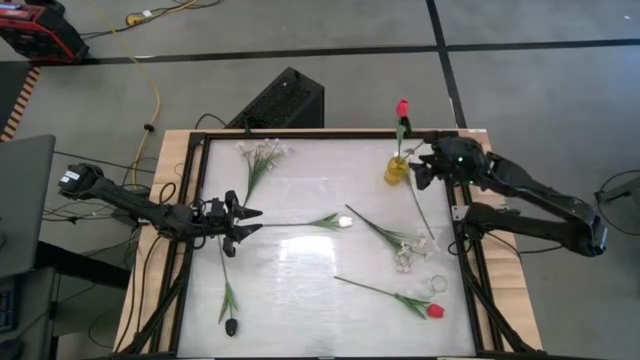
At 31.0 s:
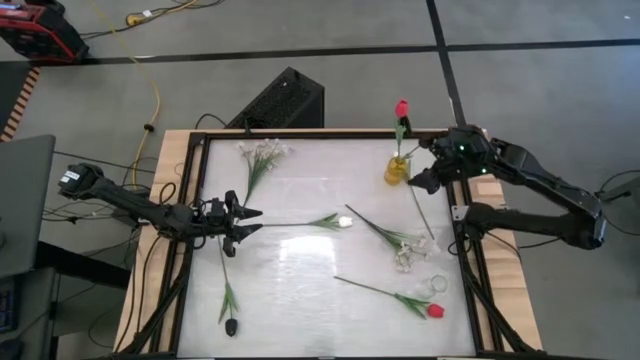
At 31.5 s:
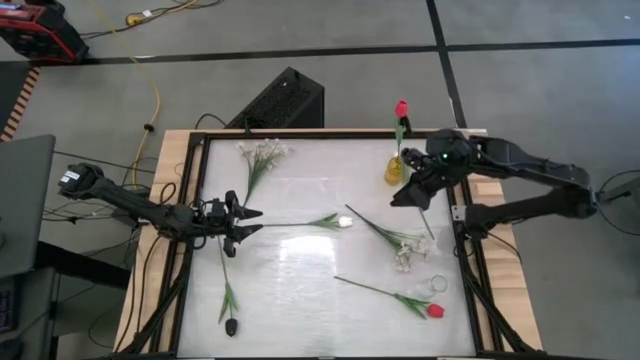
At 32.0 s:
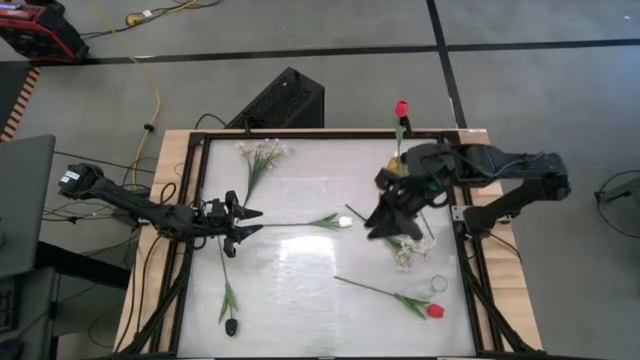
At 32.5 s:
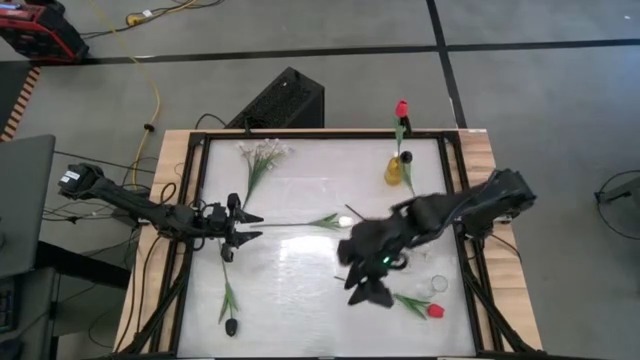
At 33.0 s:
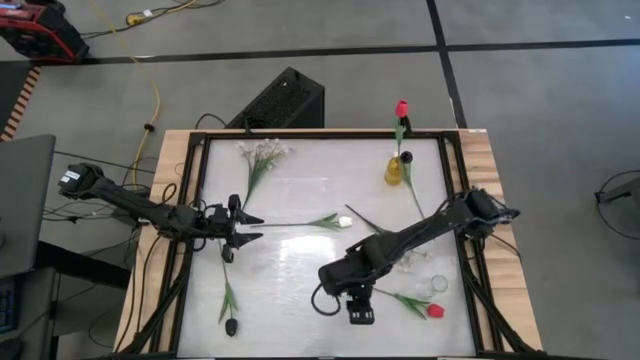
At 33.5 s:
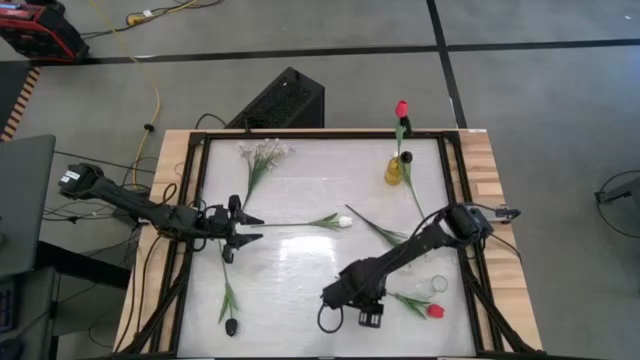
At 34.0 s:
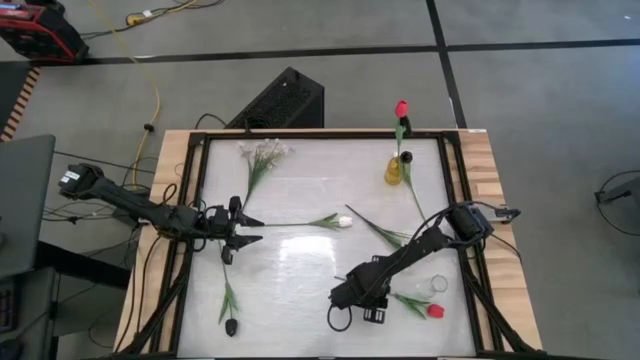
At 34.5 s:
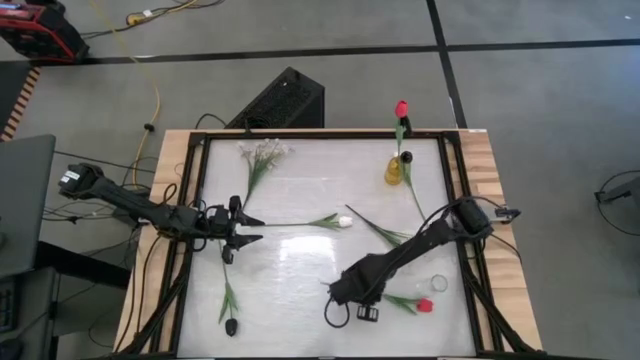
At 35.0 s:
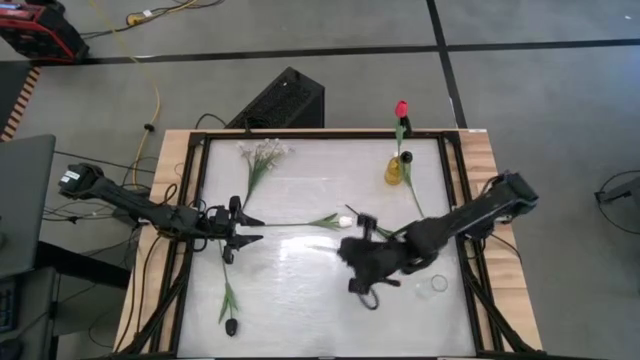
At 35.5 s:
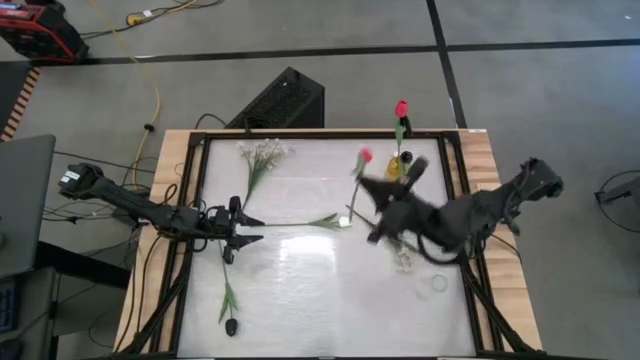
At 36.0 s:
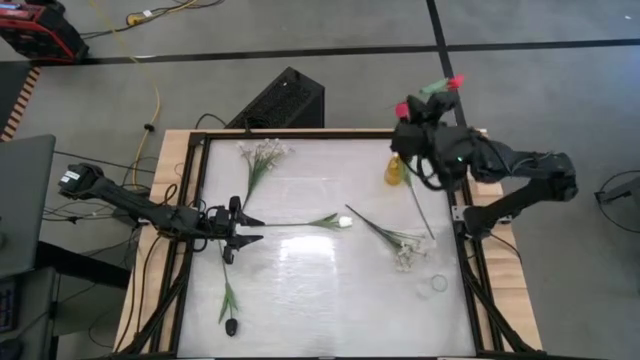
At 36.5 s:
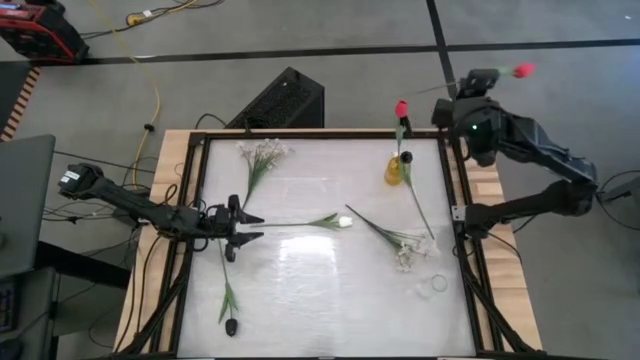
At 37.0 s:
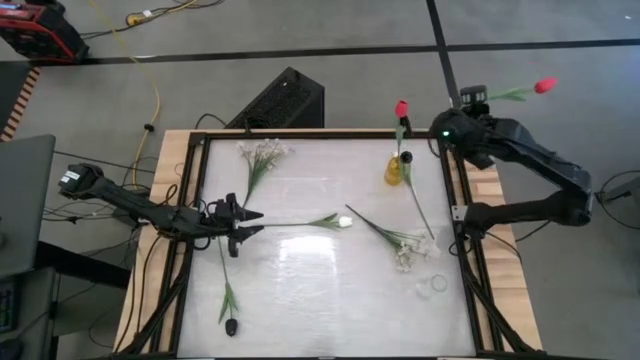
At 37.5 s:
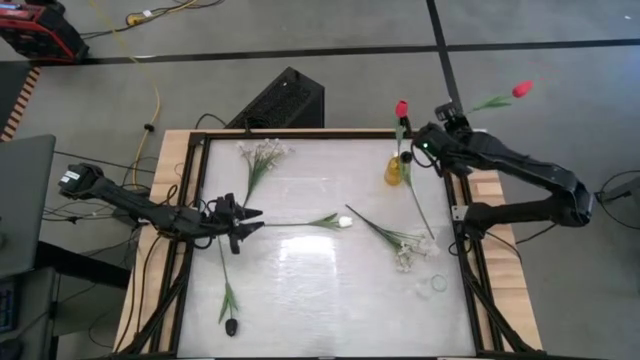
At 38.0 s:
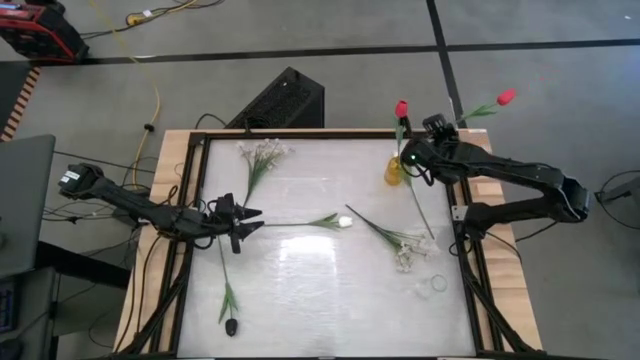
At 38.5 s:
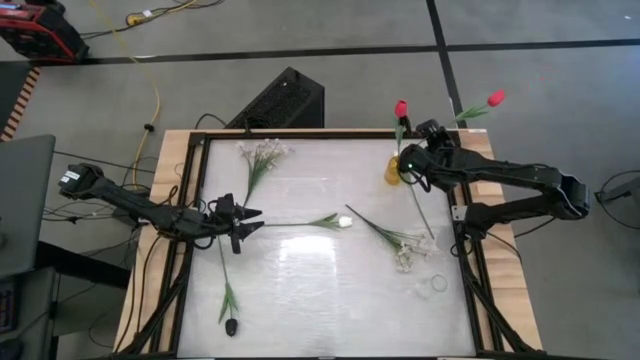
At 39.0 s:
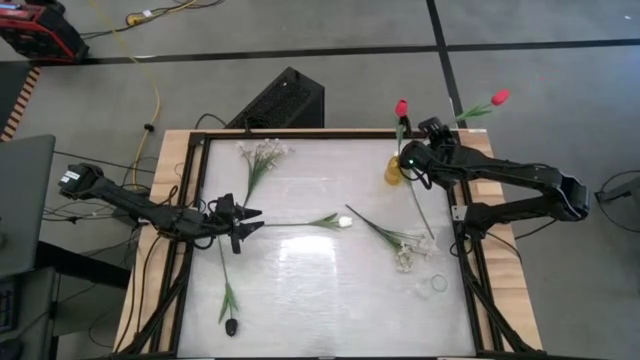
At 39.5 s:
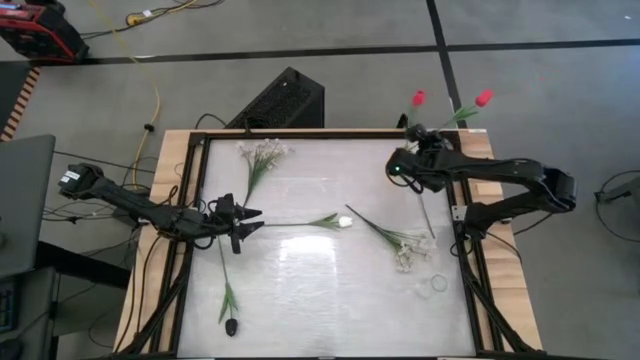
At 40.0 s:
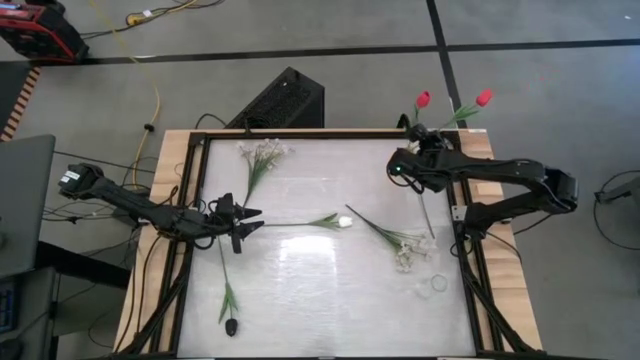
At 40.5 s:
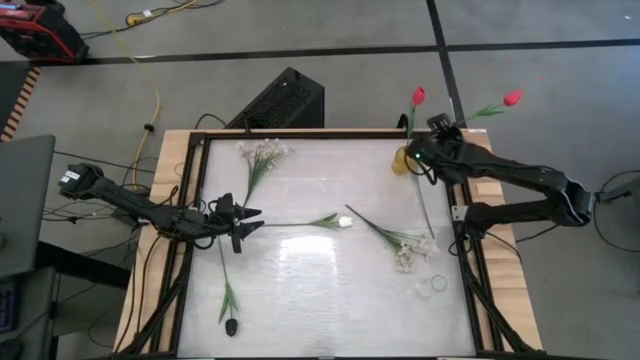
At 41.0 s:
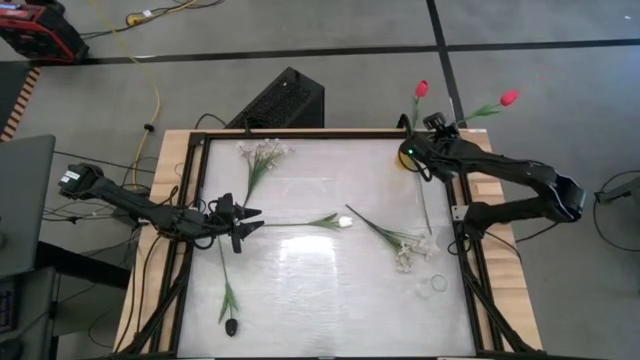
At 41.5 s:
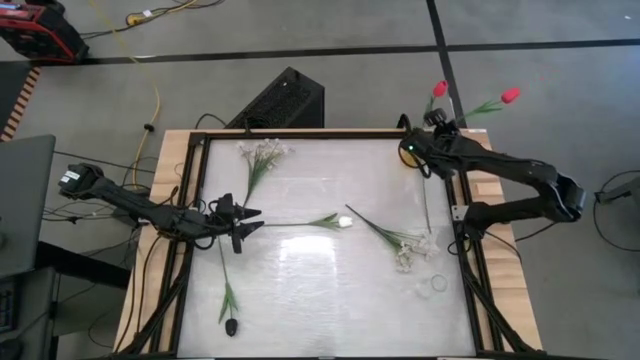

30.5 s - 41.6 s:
Task: Sort flowers into vase by color
Put the red flower into the yellow flower vase

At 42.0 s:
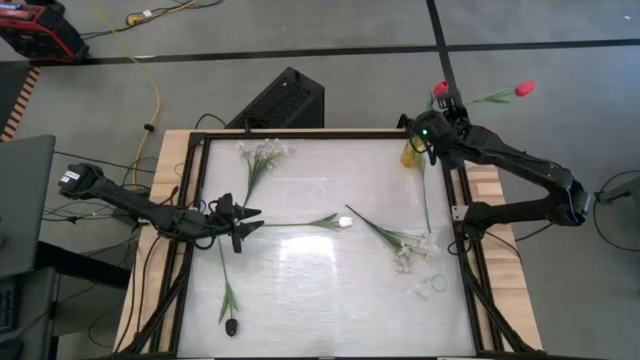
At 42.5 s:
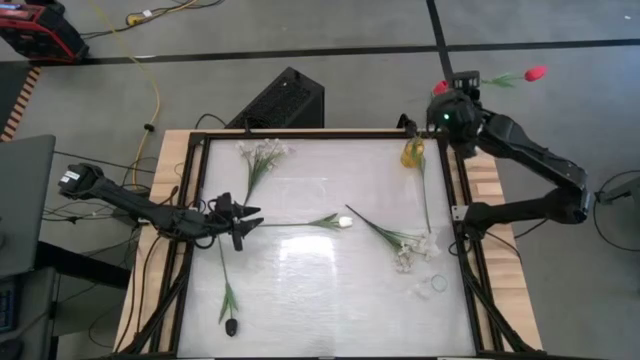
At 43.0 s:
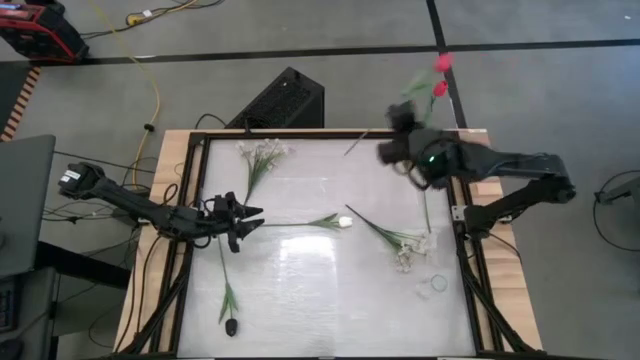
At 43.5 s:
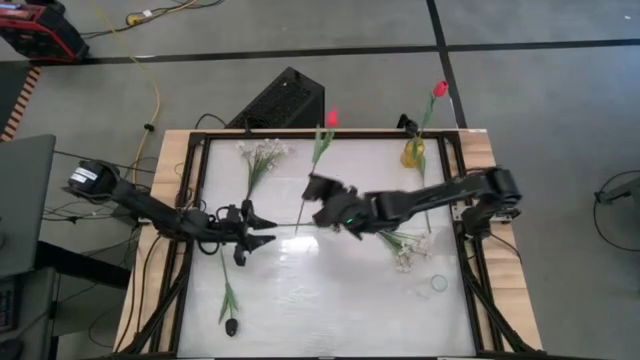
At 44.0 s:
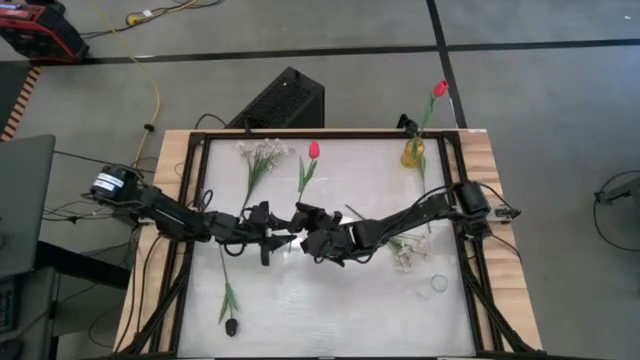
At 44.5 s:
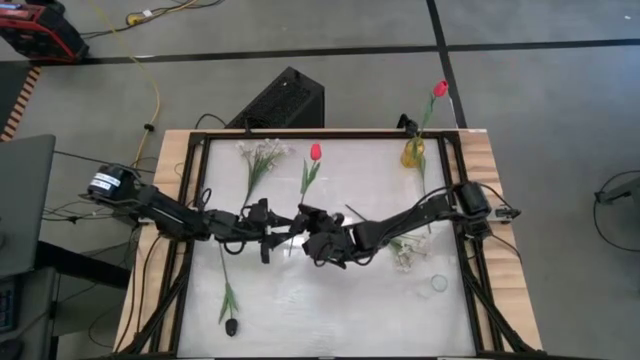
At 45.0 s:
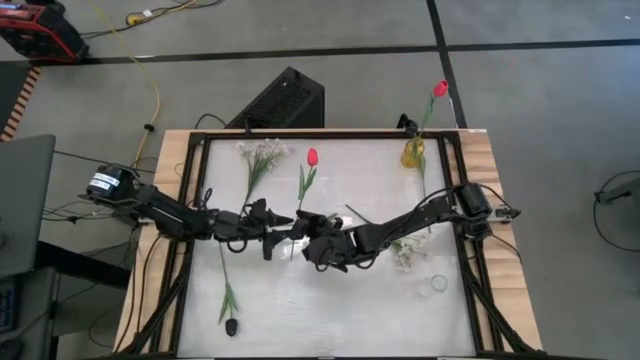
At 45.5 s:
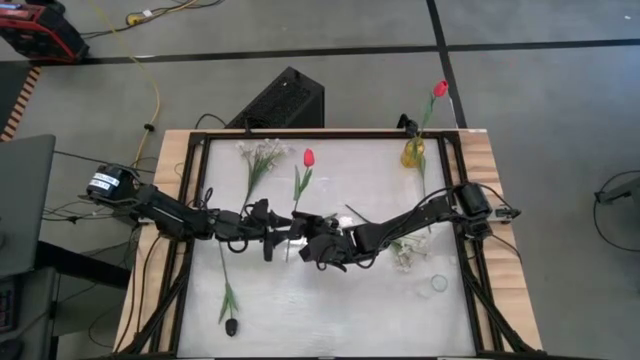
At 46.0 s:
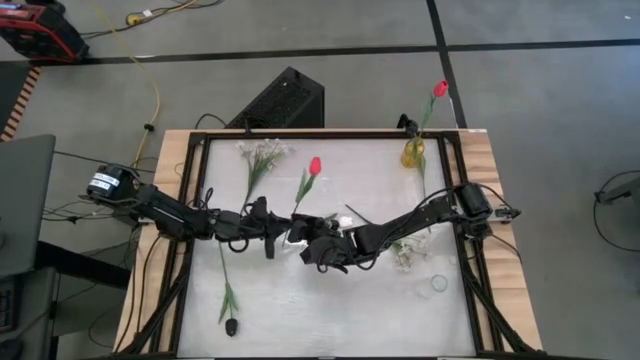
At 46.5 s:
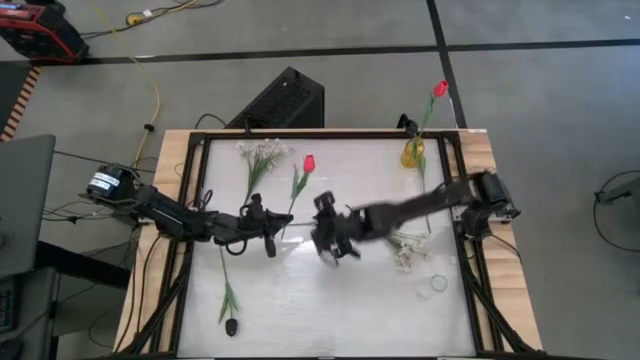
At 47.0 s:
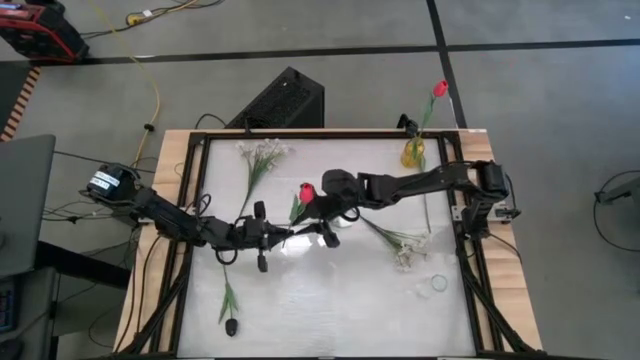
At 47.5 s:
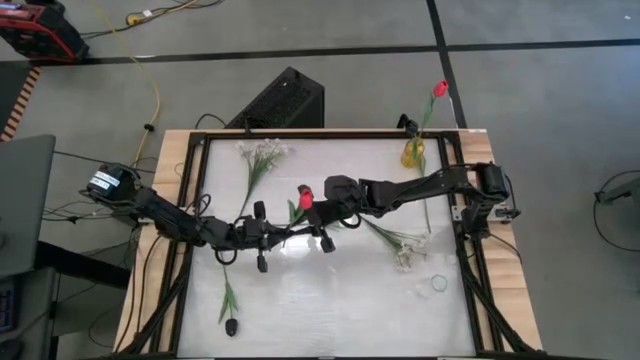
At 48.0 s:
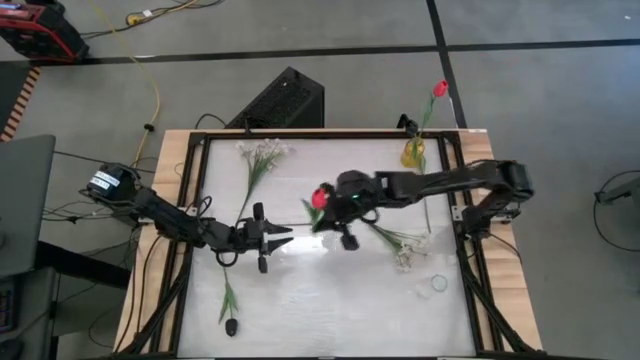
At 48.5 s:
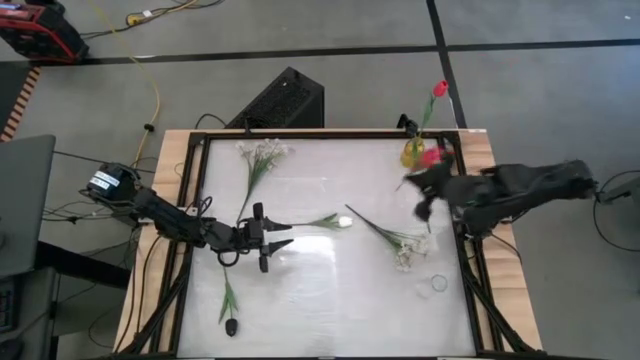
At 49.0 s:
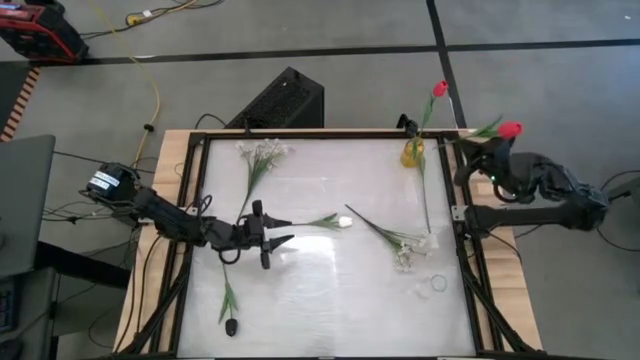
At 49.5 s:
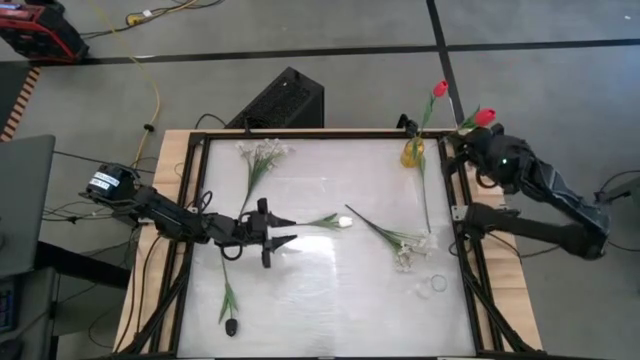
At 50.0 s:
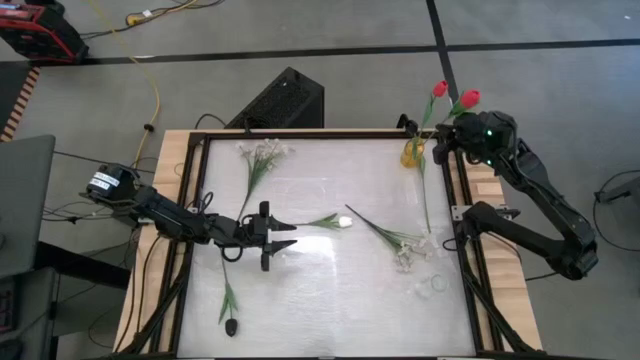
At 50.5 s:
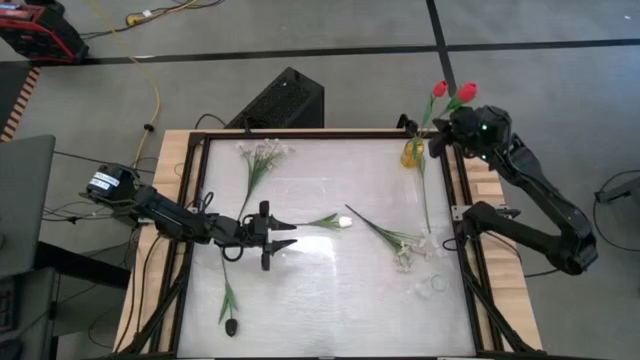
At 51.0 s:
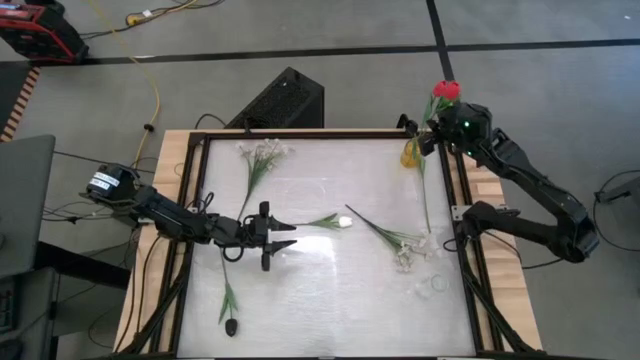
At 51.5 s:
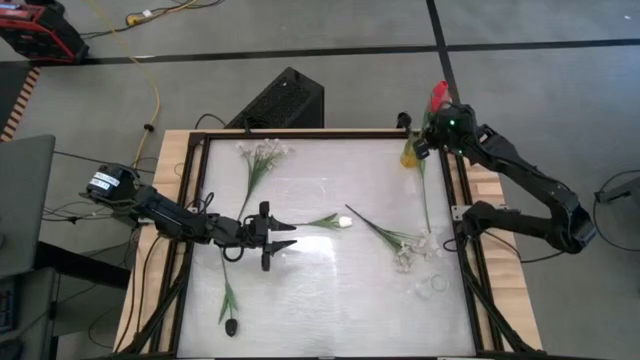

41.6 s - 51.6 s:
Put the red flower into the yellow flower vase
